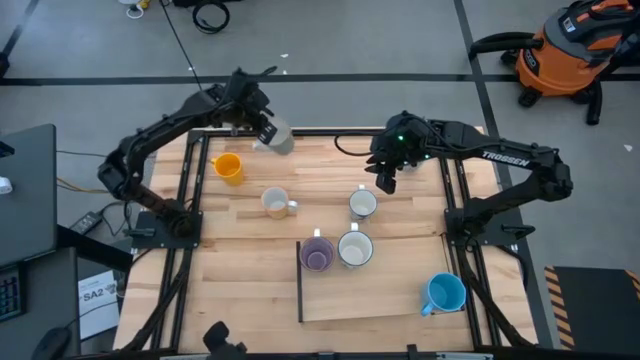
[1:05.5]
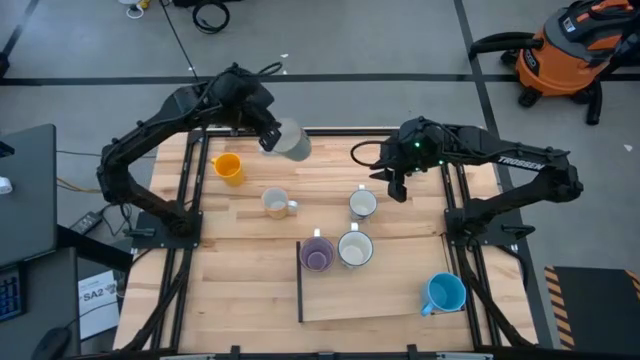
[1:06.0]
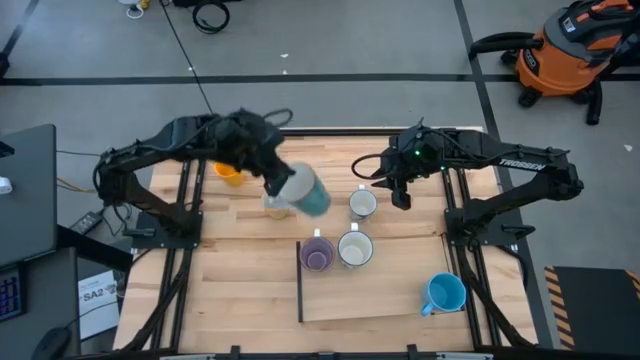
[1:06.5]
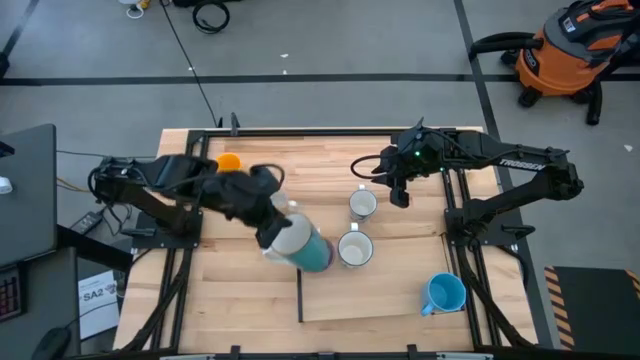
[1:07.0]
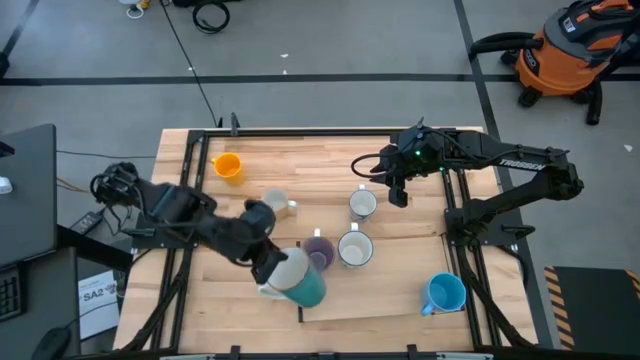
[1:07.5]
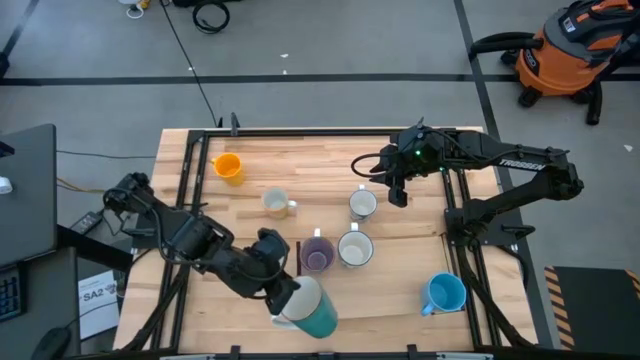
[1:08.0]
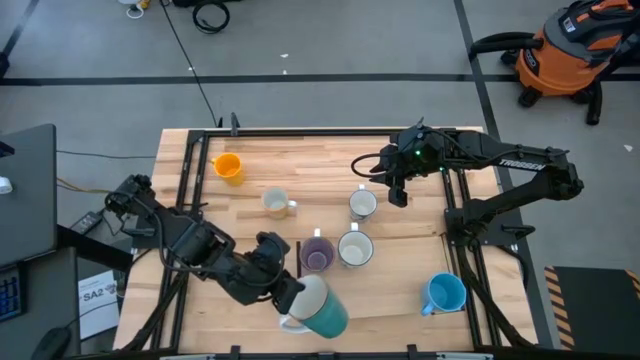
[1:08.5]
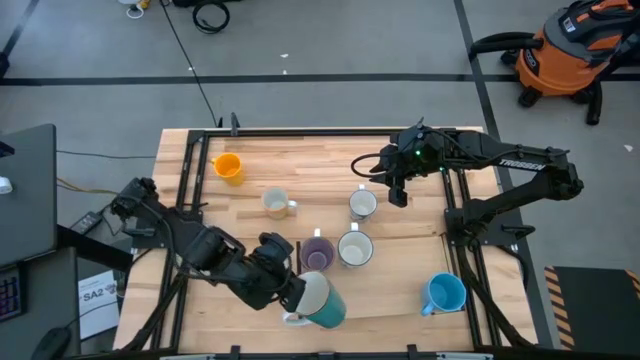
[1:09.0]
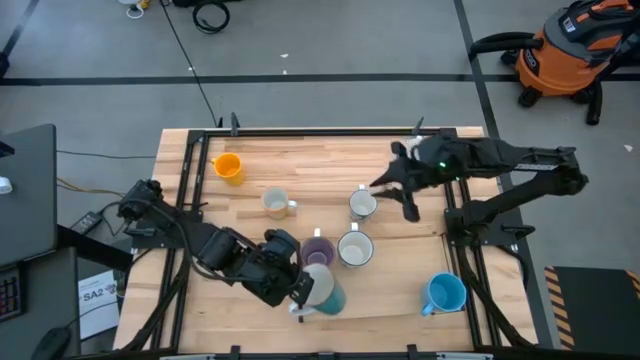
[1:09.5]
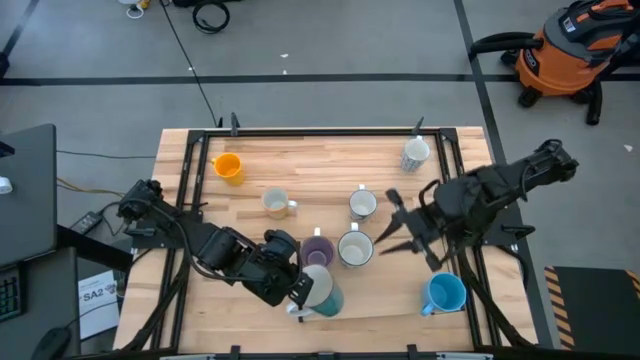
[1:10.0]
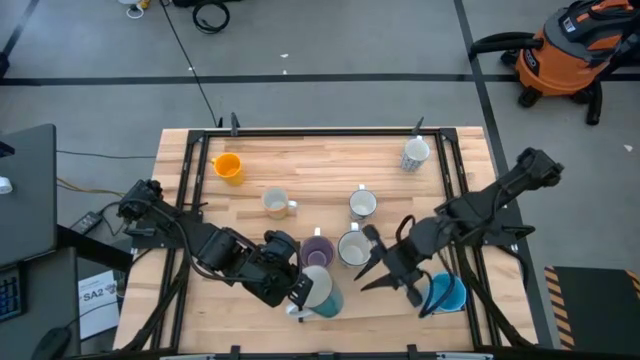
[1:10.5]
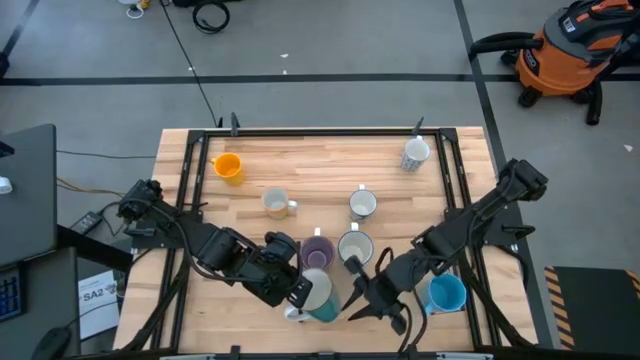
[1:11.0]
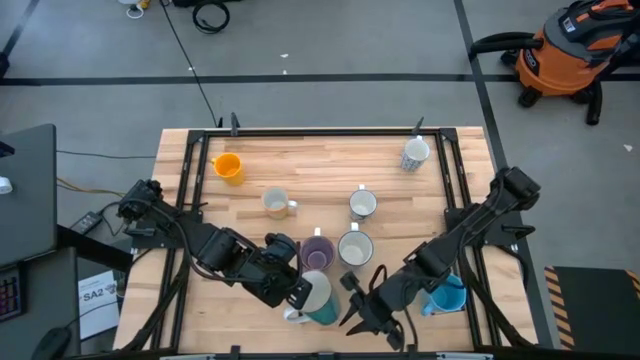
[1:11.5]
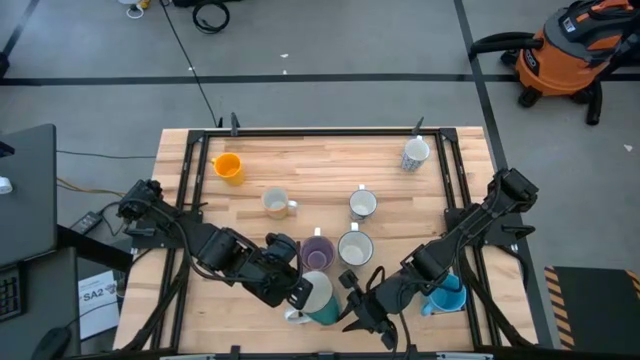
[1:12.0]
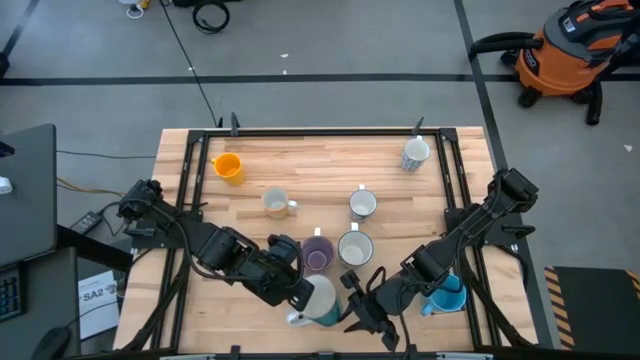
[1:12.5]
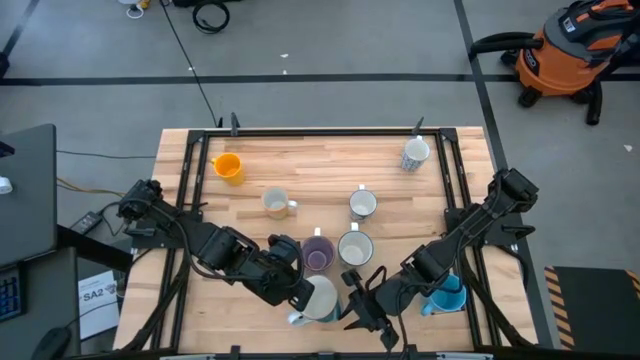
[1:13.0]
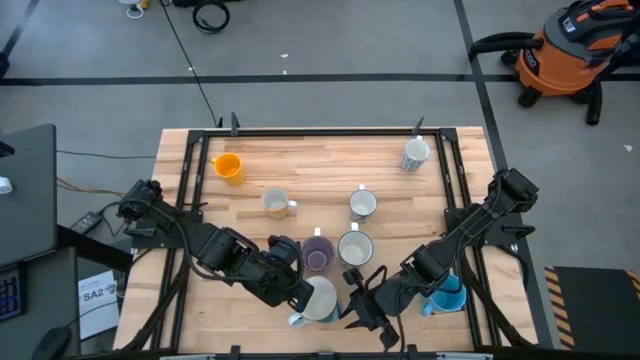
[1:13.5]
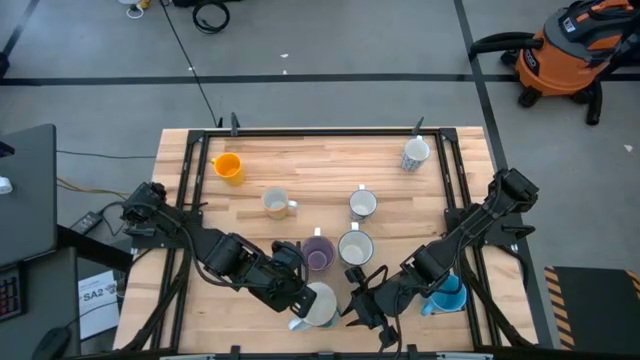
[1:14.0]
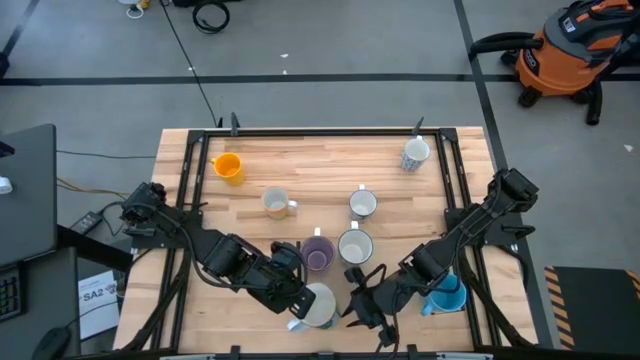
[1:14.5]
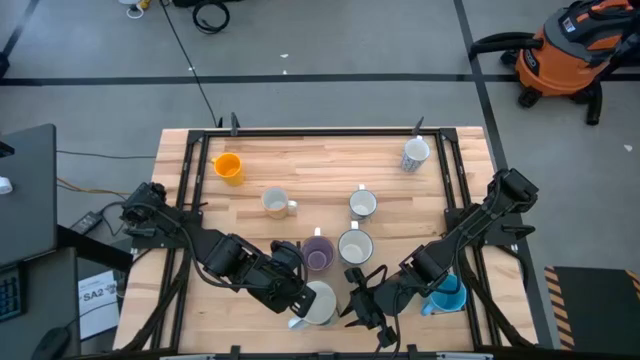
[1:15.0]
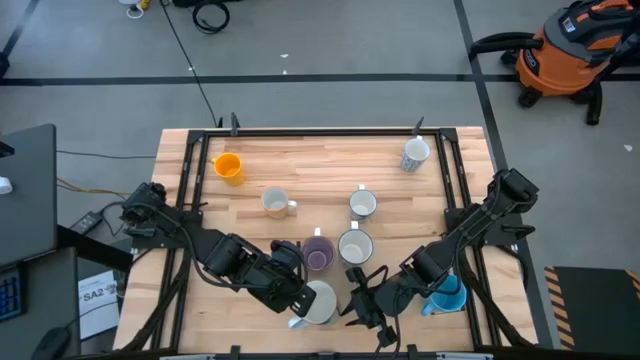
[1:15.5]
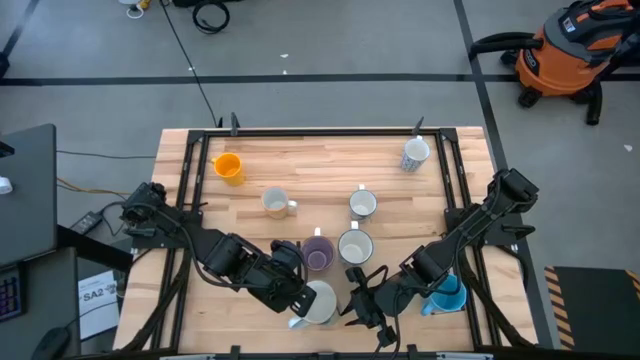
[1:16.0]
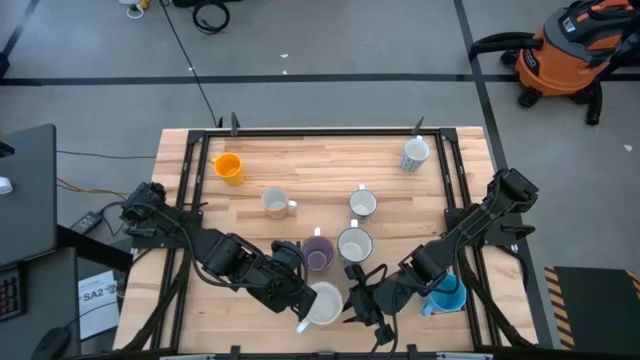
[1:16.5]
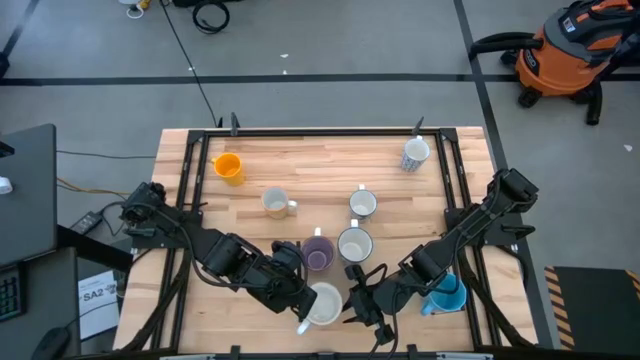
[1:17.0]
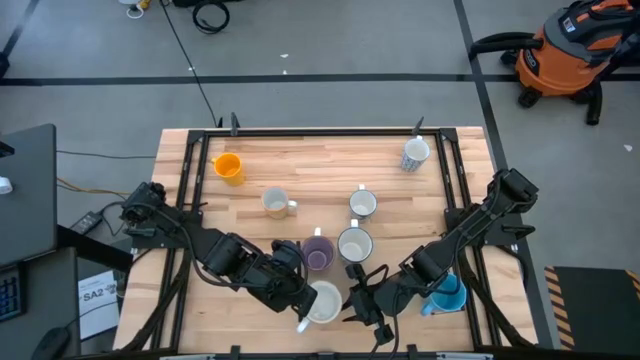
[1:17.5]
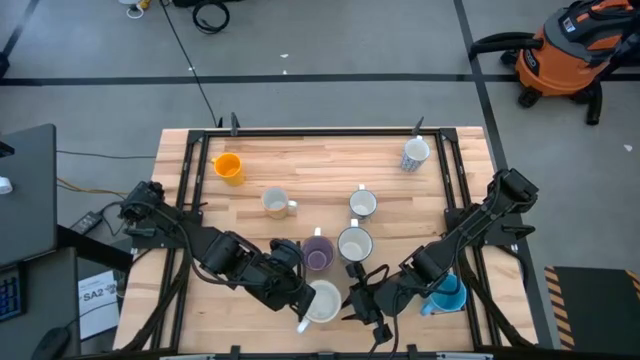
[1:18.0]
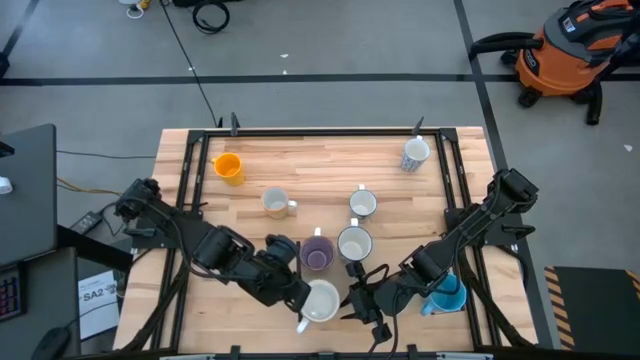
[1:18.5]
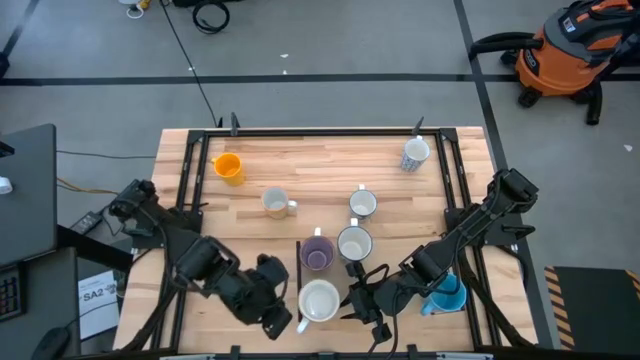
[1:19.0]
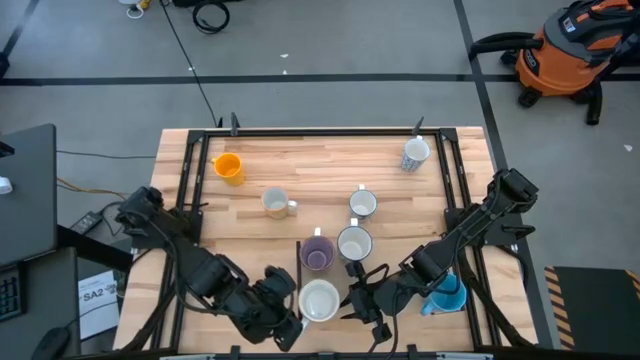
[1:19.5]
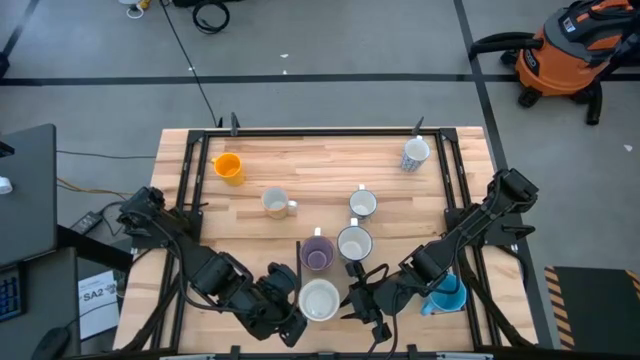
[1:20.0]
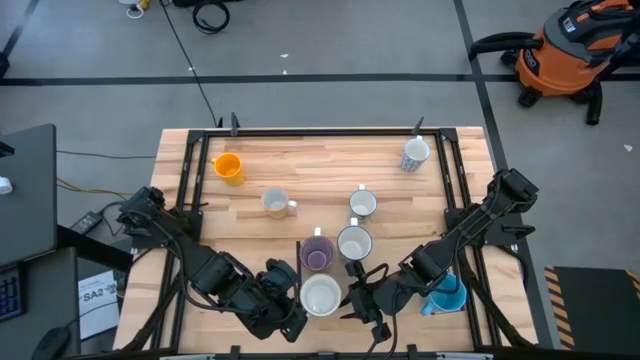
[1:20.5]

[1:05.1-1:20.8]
Task: Place coffee mugs
Put the green blue mug on the shelf

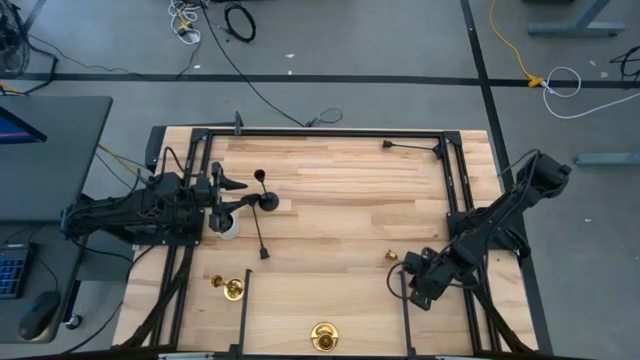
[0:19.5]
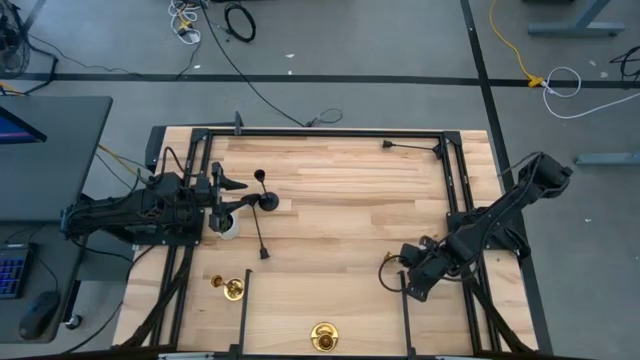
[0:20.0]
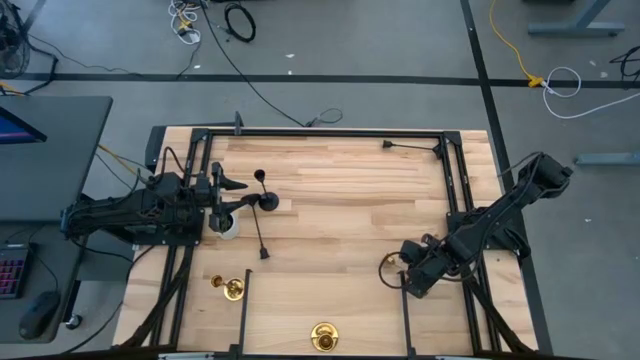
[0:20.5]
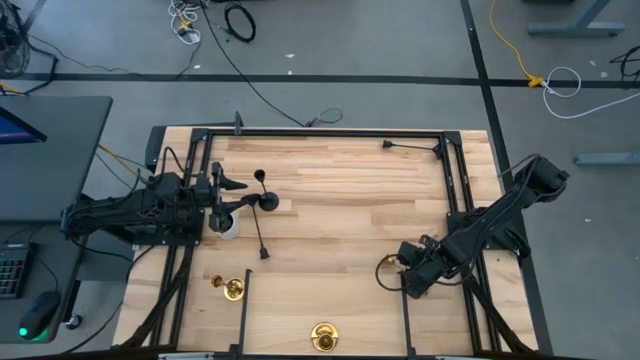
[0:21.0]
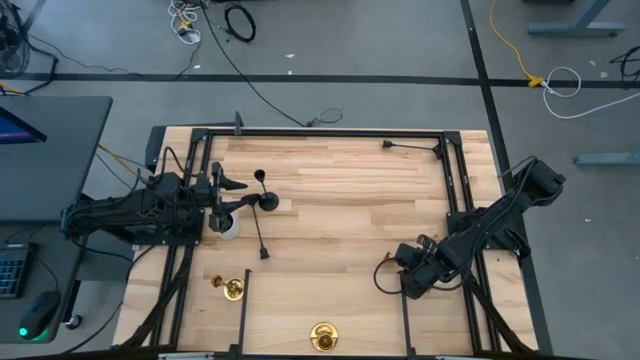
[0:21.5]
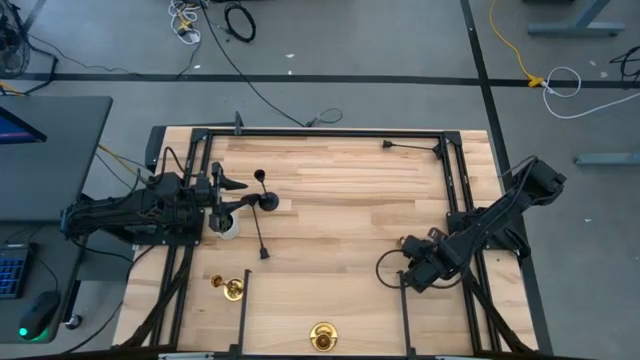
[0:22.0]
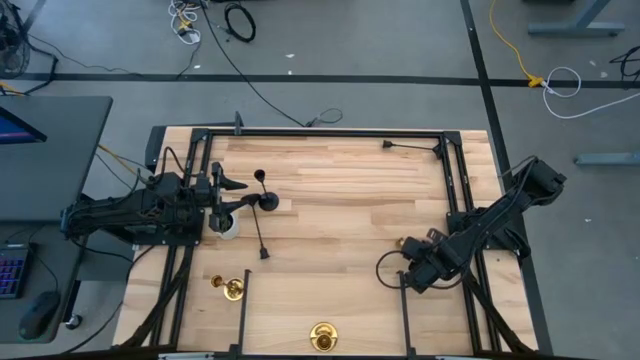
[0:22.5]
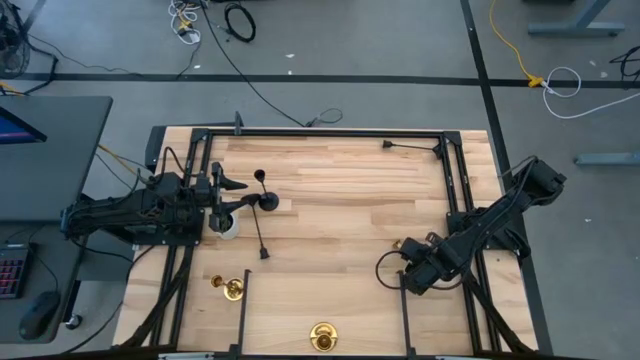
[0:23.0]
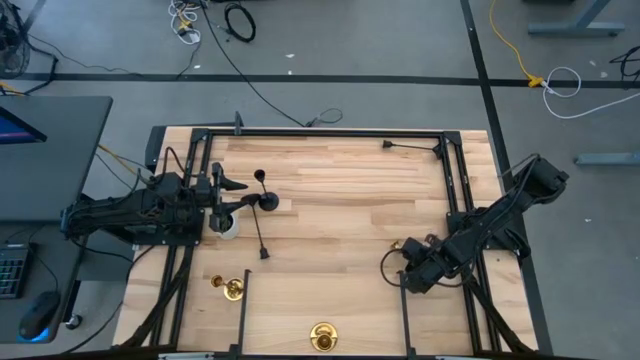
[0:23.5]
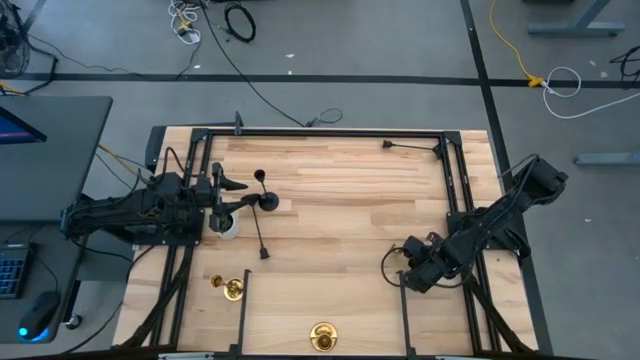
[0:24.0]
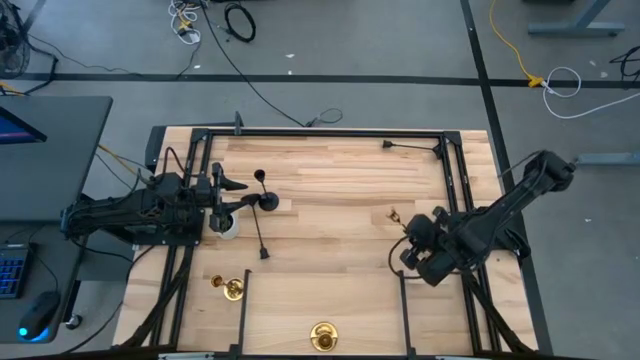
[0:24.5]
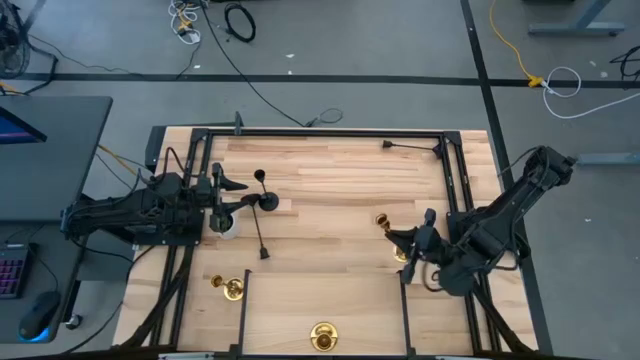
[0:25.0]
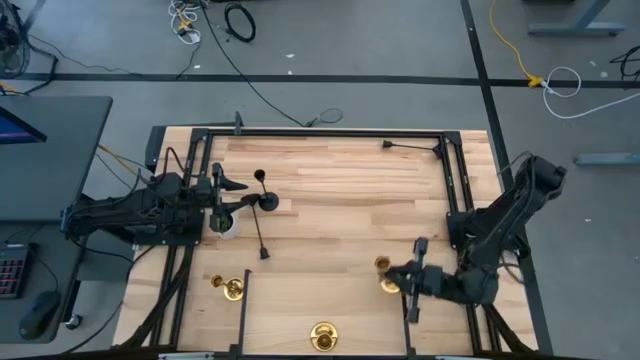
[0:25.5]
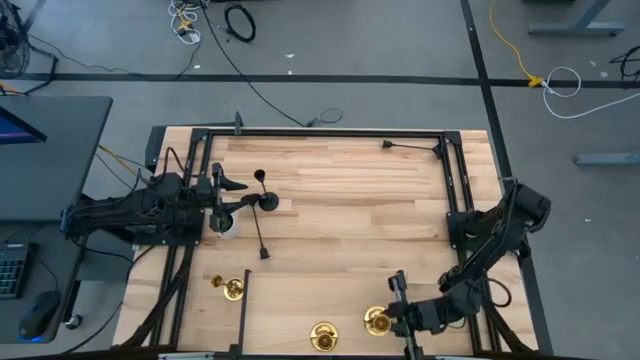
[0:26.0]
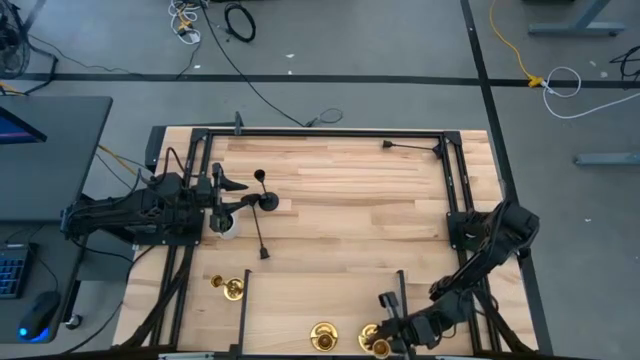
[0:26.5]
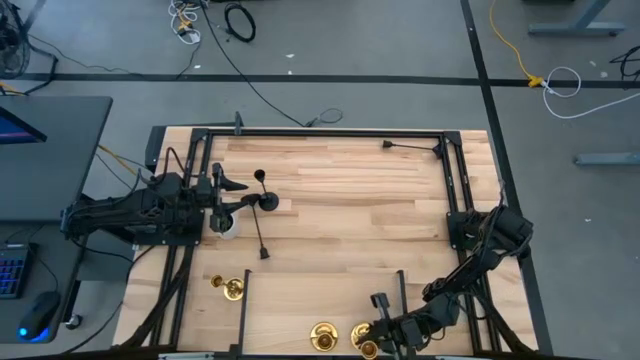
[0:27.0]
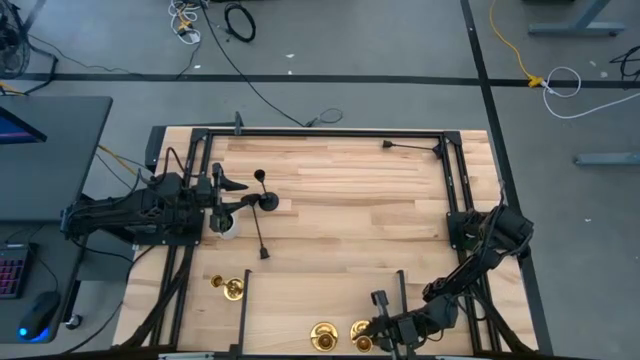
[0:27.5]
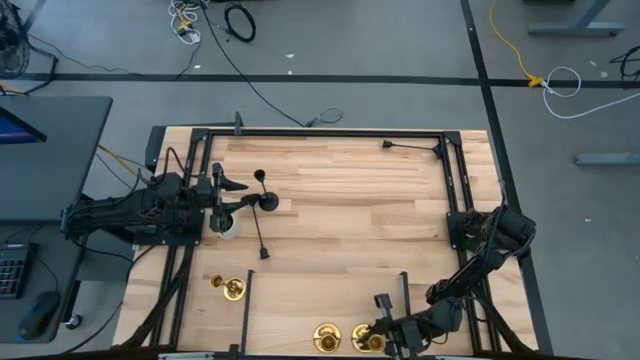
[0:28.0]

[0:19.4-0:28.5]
Task: Pick & Place candle stick holders
Put the right yellow candlestick on the shelf
